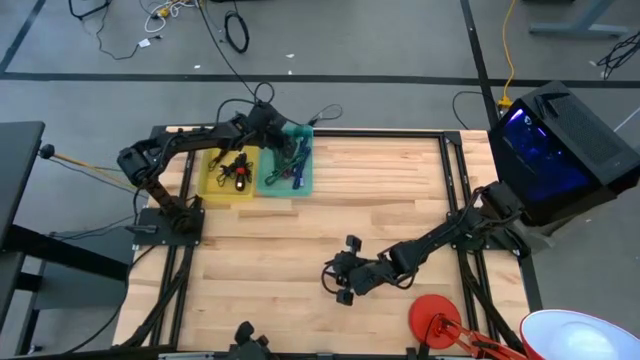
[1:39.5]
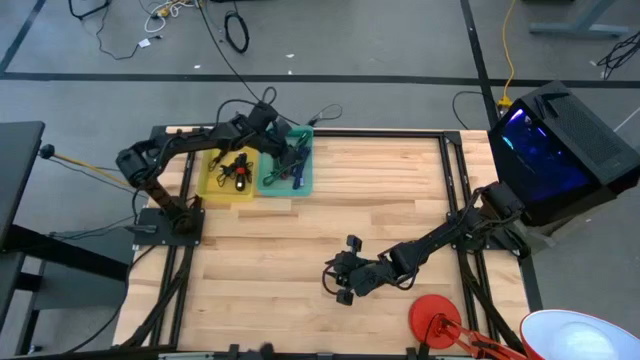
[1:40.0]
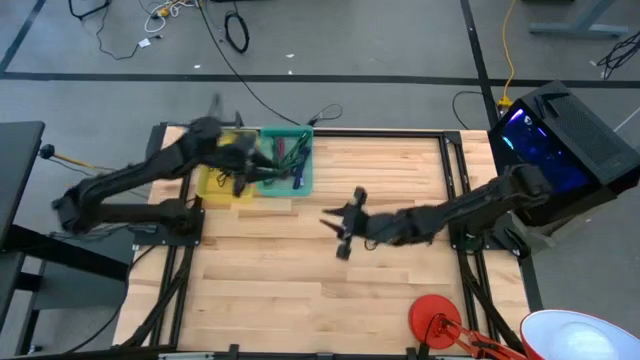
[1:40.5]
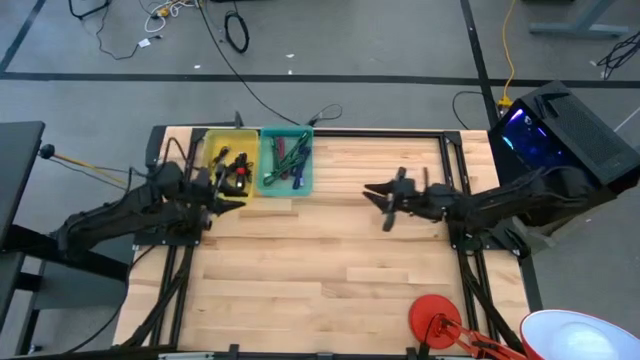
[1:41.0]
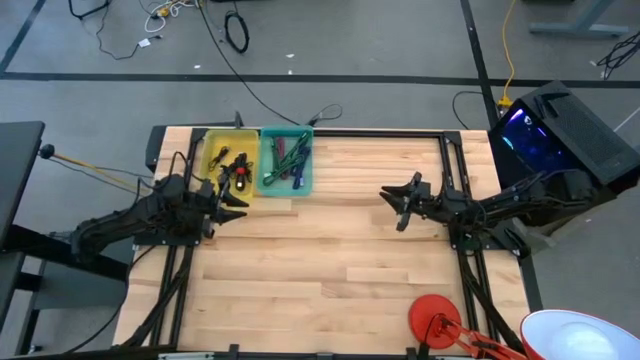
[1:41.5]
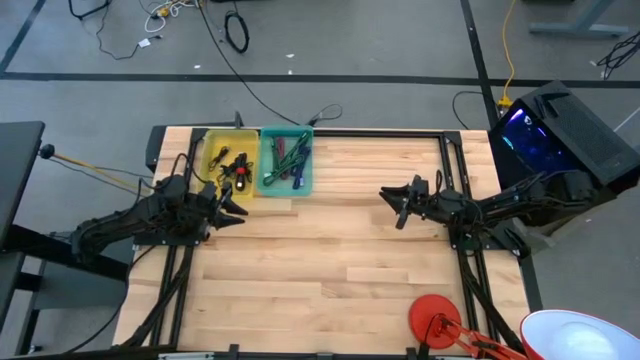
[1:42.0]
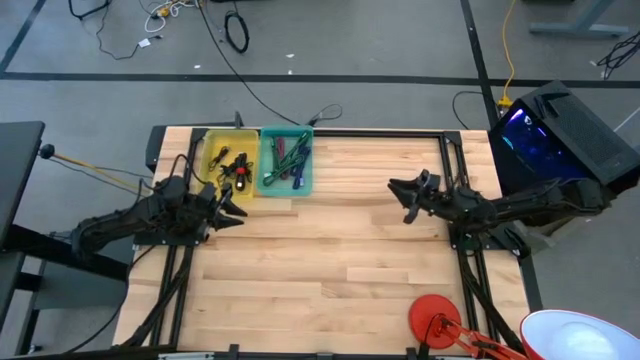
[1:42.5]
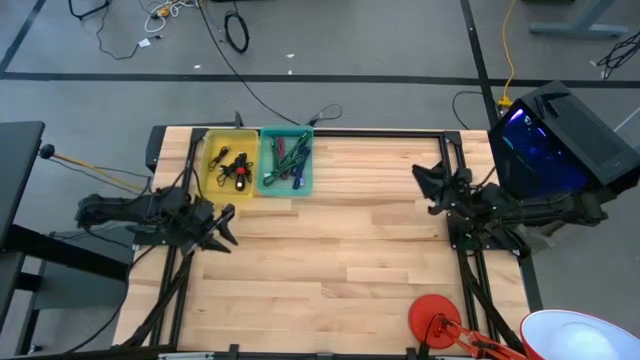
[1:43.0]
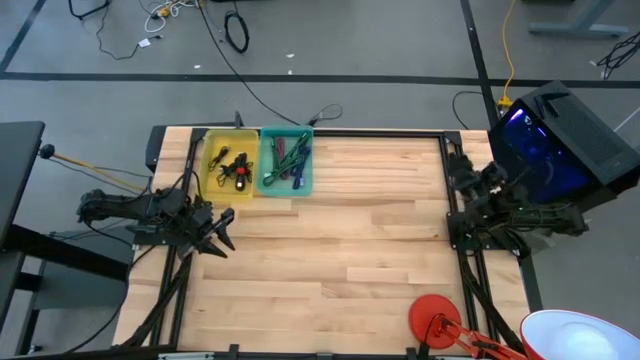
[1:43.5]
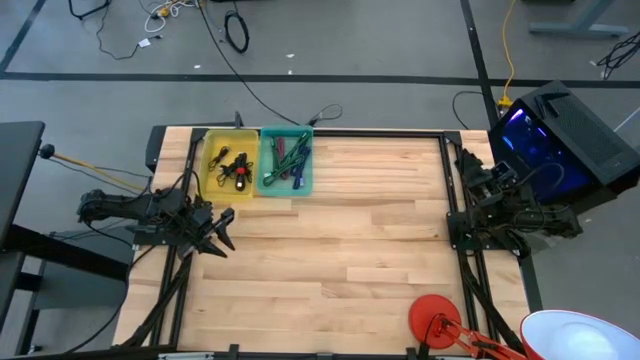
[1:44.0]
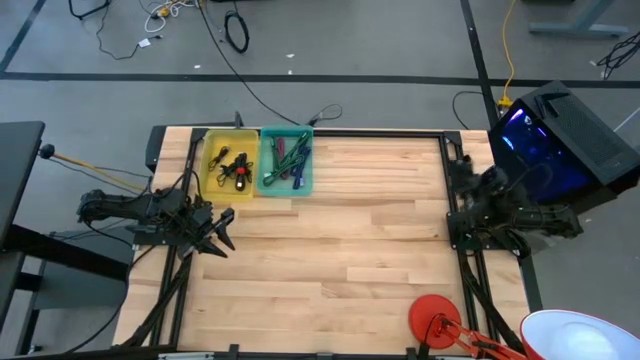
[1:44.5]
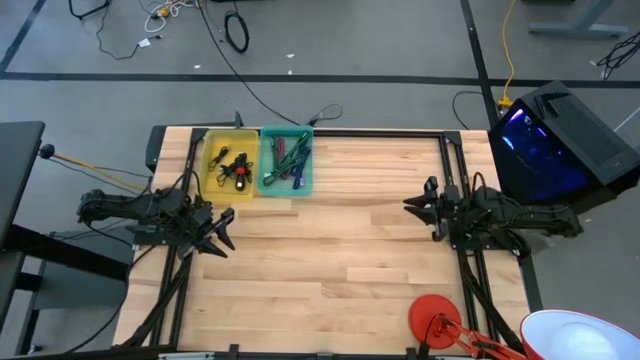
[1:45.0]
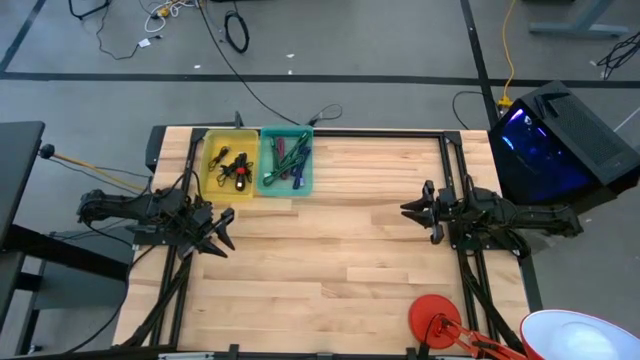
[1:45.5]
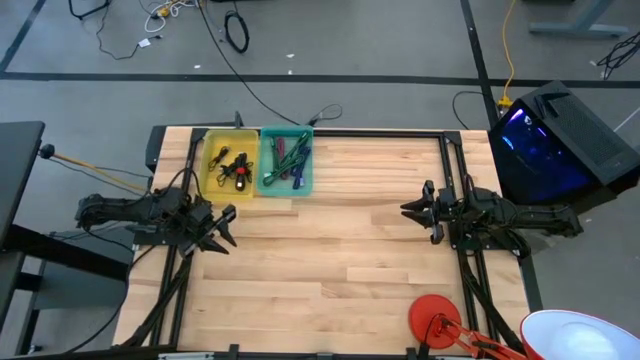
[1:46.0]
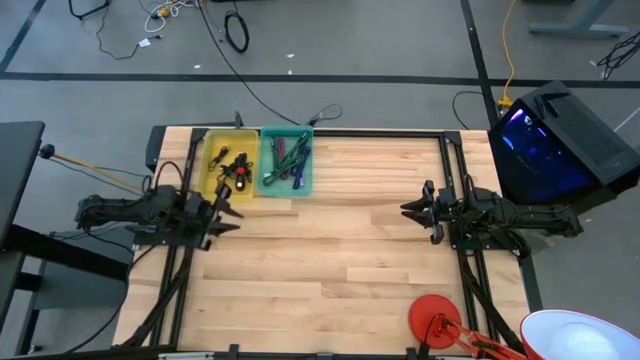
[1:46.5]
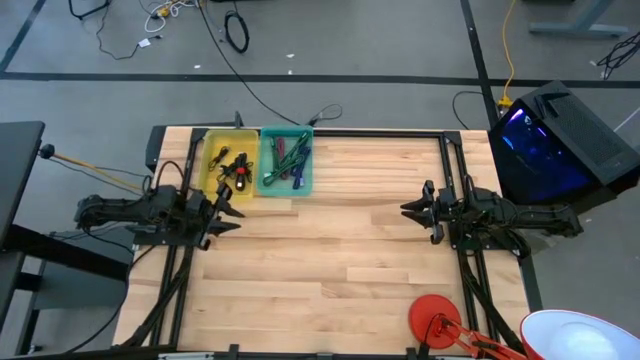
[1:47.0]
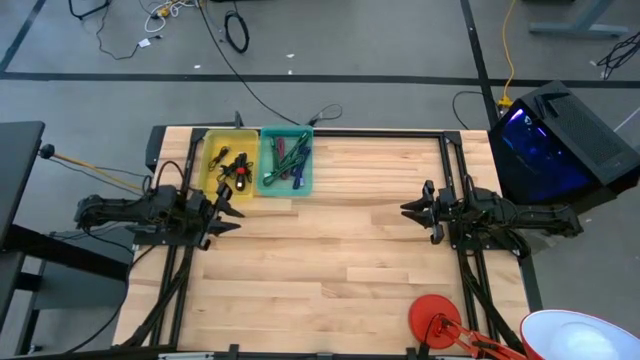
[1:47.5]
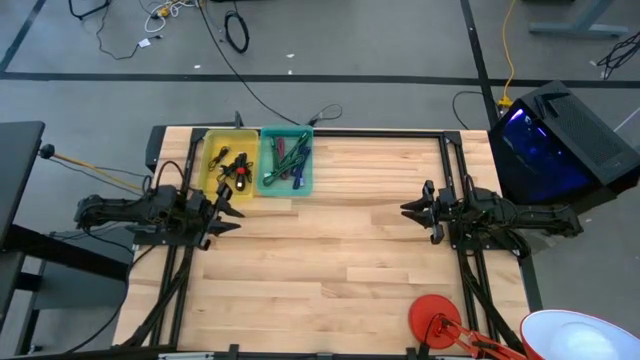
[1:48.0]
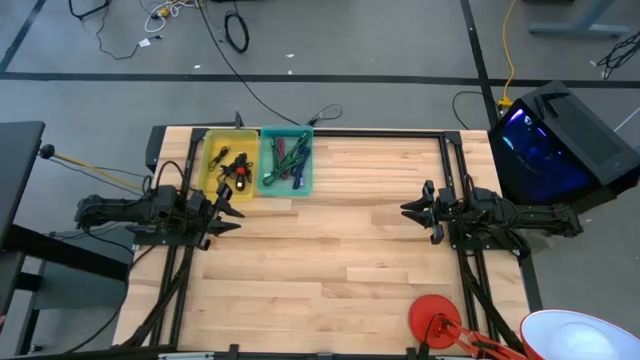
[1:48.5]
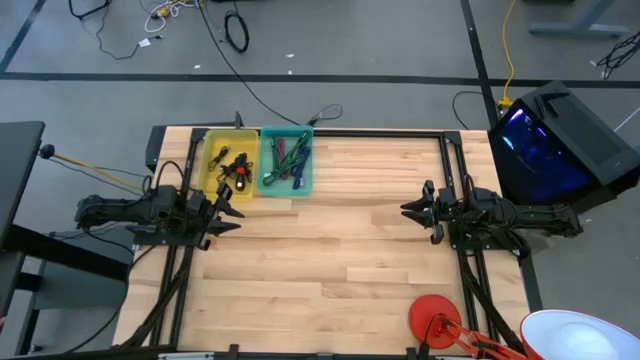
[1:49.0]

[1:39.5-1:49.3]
Task: Pick & Place USB Port
Return to Home Position

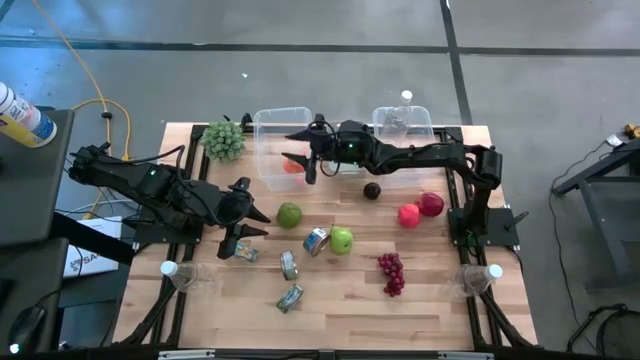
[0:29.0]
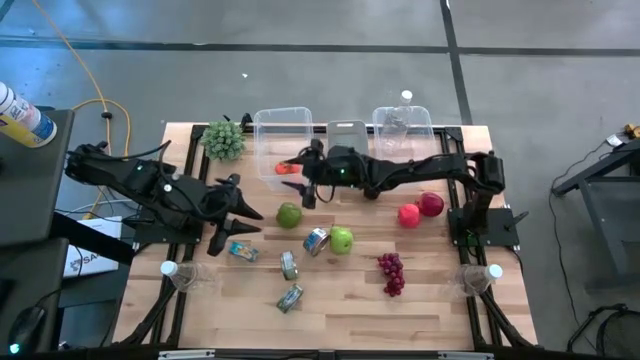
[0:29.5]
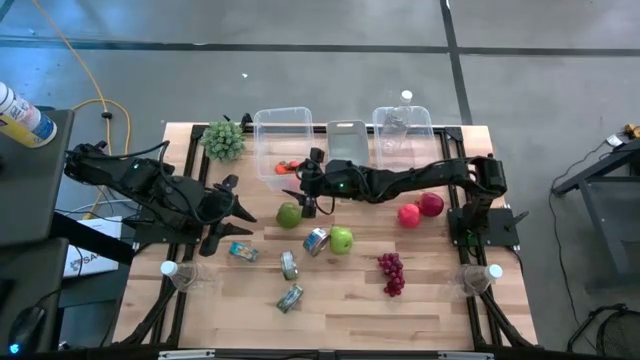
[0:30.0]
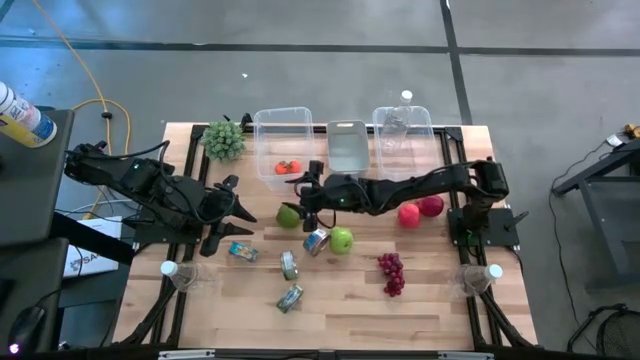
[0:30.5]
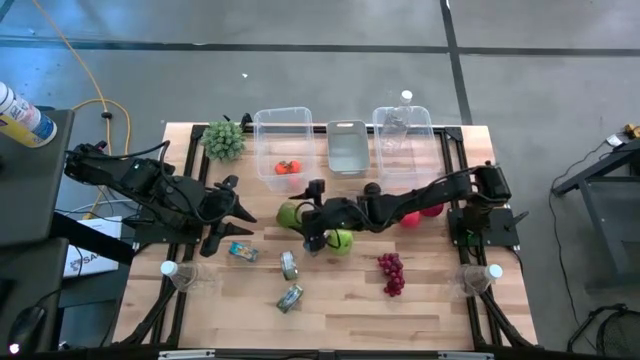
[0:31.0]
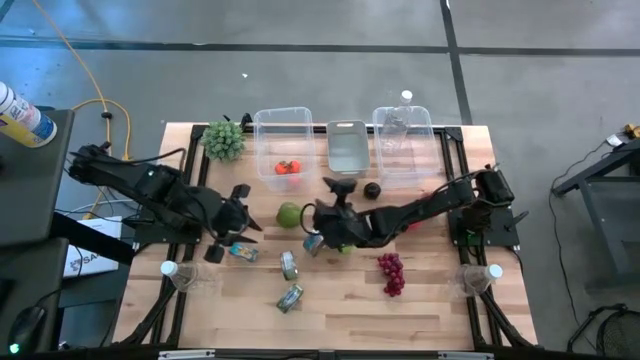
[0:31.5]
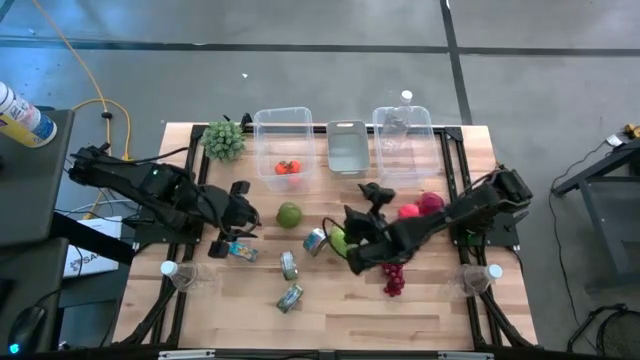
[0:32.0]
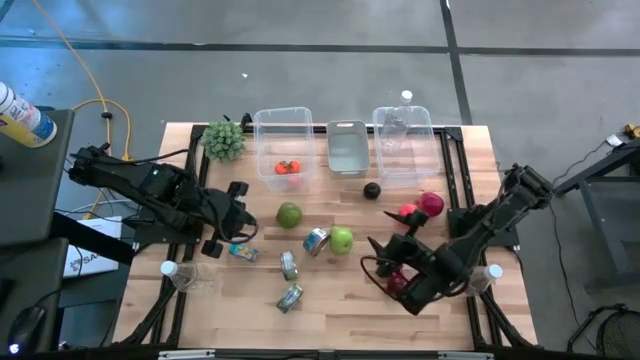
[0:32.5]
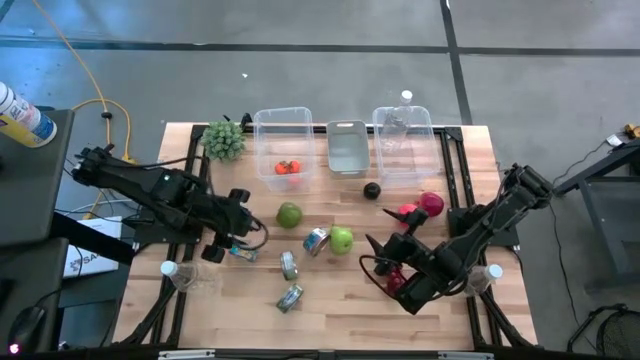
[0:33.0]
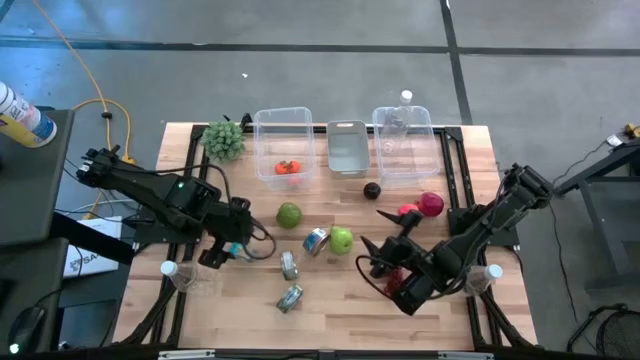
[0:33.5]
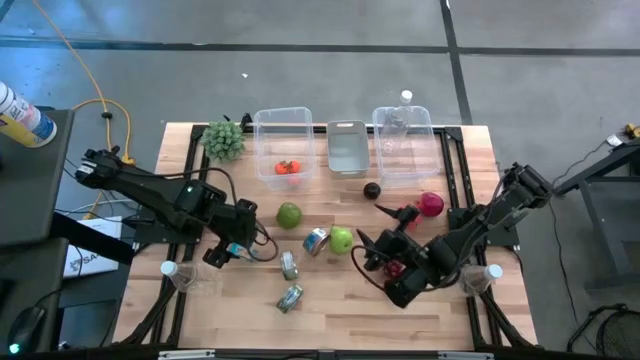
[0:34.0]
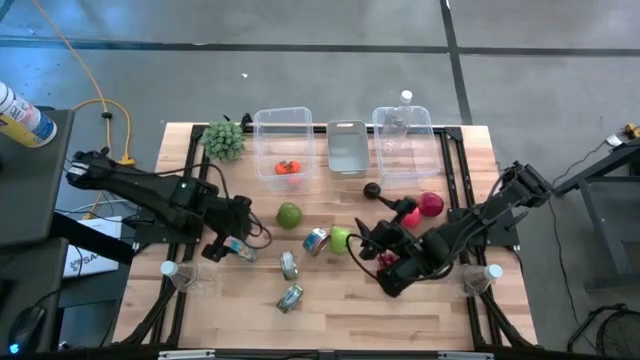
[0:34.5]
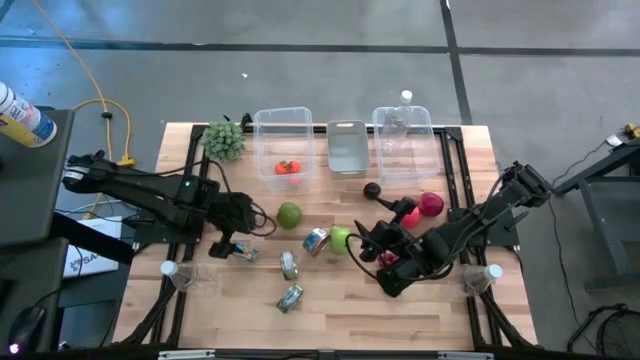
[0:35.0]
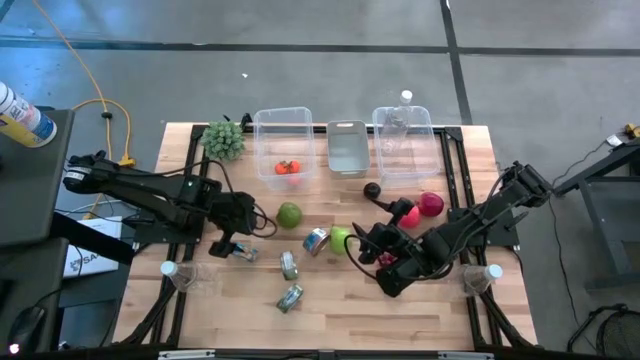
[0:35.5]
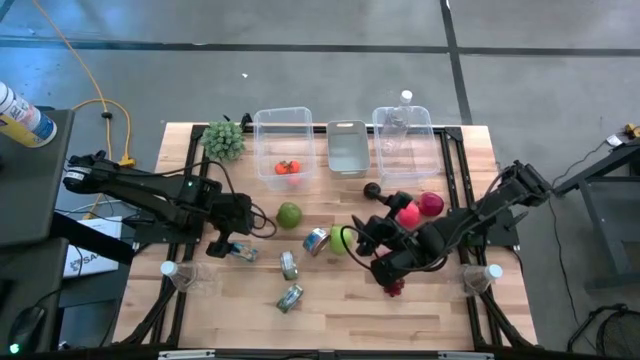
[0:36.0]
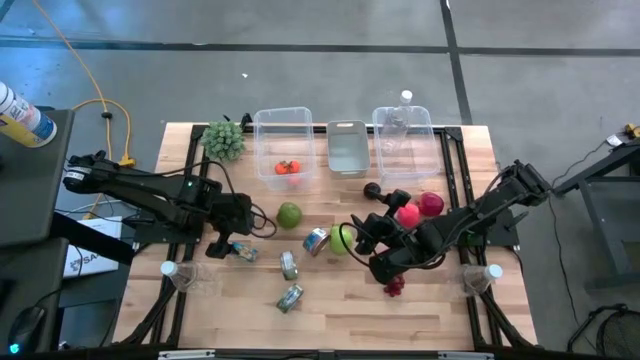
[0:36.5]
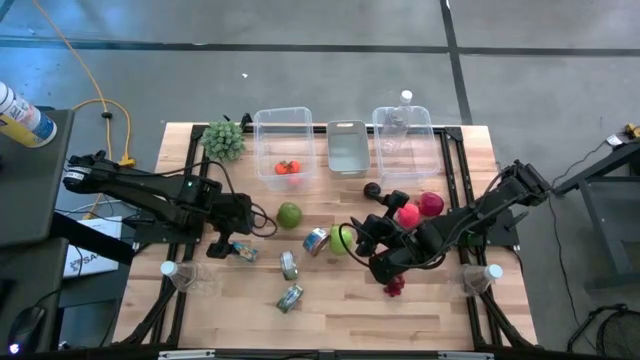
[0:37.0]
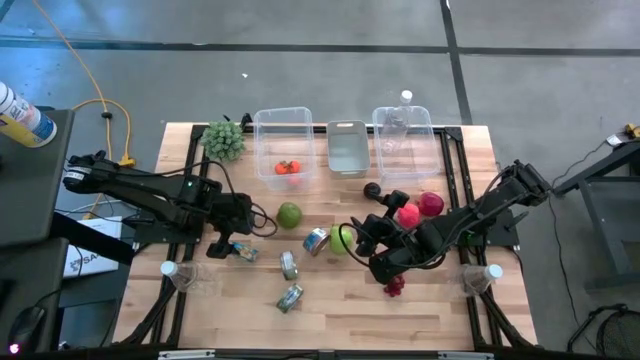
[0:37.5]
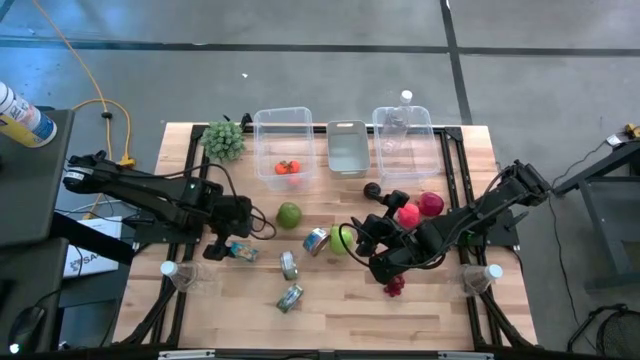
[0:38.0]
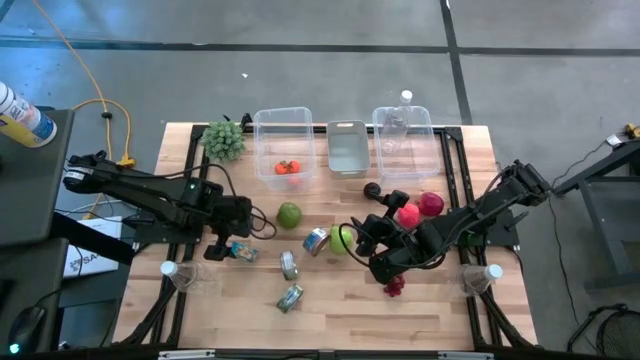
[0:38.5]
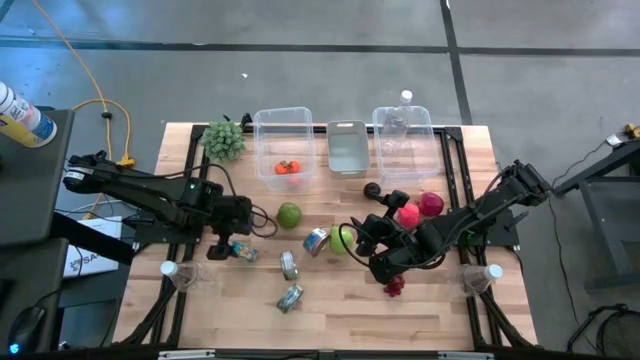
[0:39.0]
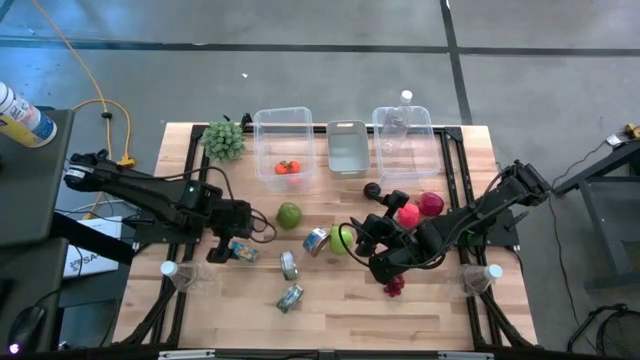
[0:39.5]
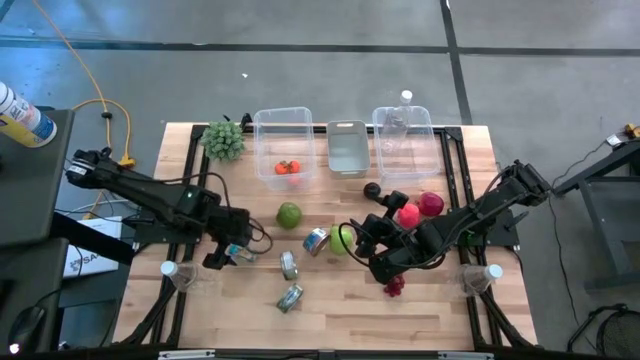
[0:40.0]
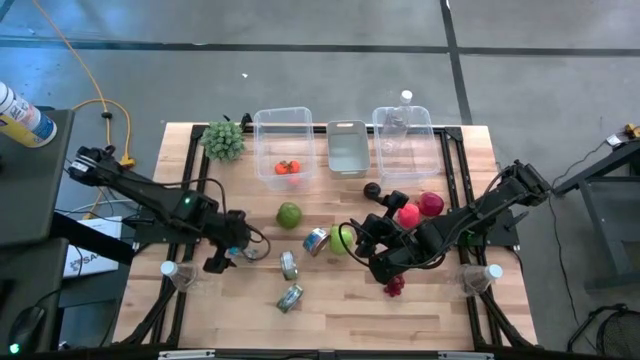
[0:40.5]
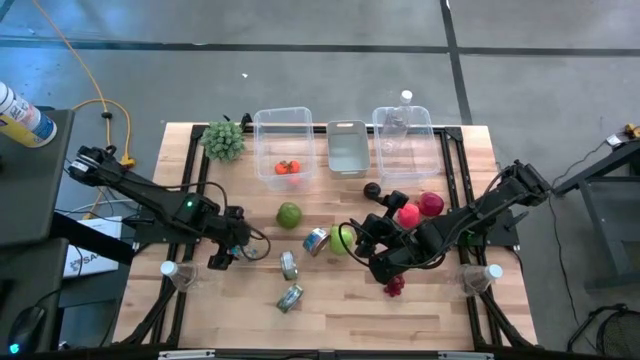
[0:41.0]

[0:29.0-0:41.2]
Task: Pick & Place Food Item
Put the yellow and blue tuna can into the gray bin
